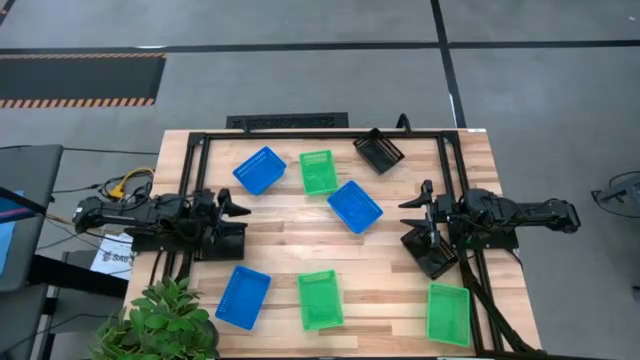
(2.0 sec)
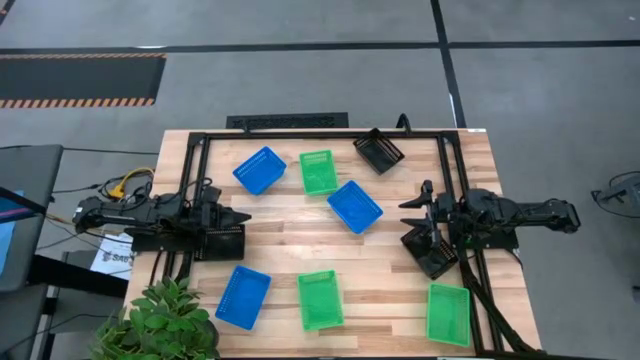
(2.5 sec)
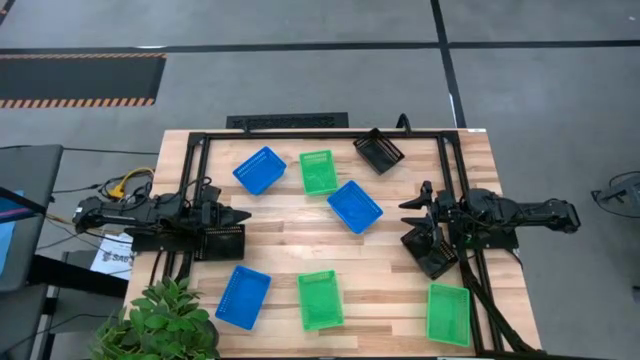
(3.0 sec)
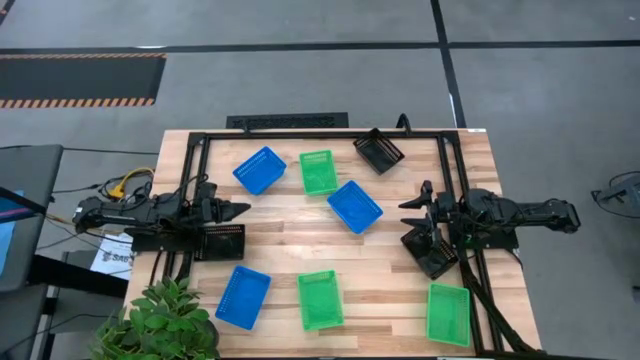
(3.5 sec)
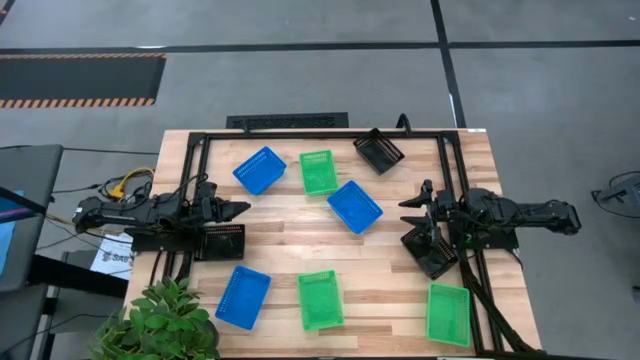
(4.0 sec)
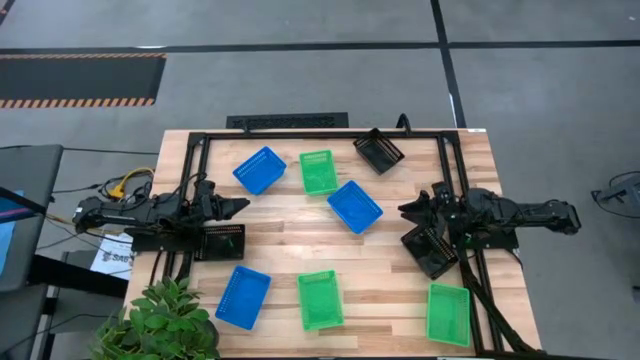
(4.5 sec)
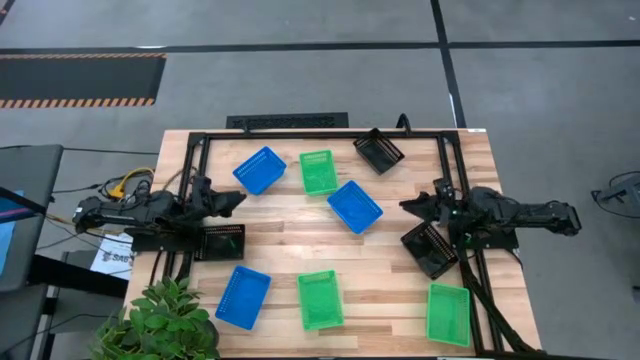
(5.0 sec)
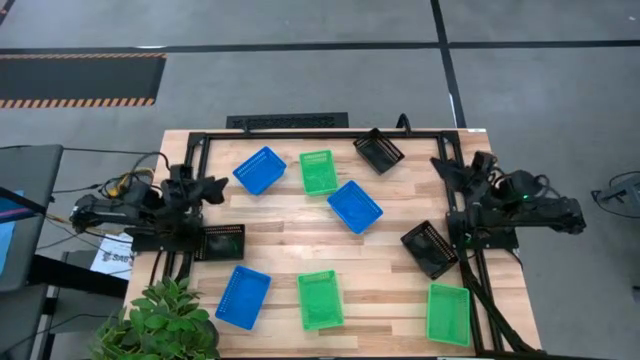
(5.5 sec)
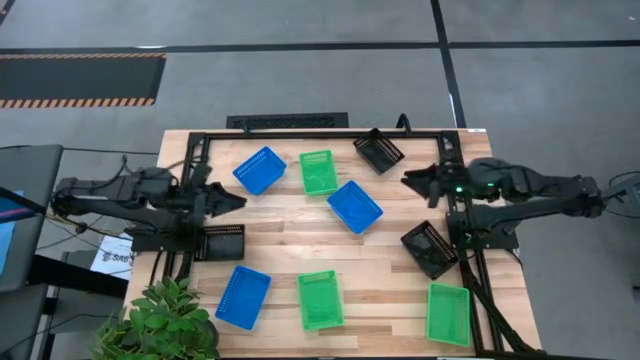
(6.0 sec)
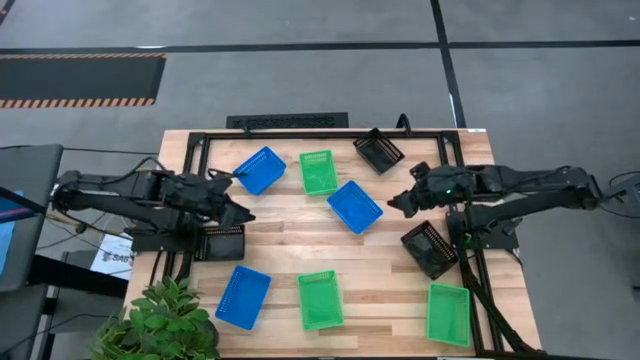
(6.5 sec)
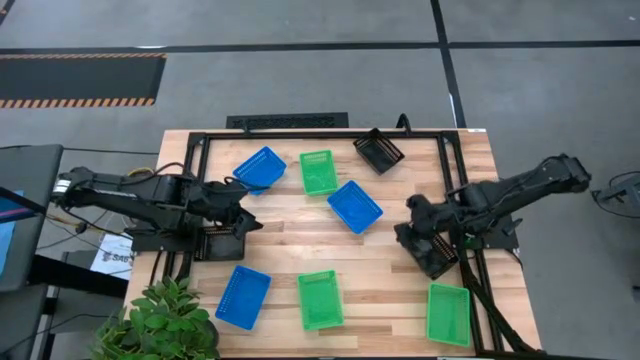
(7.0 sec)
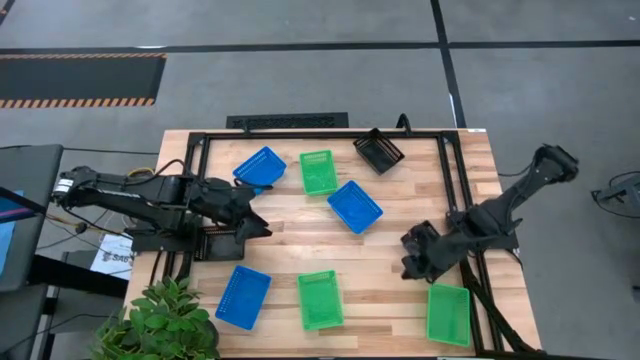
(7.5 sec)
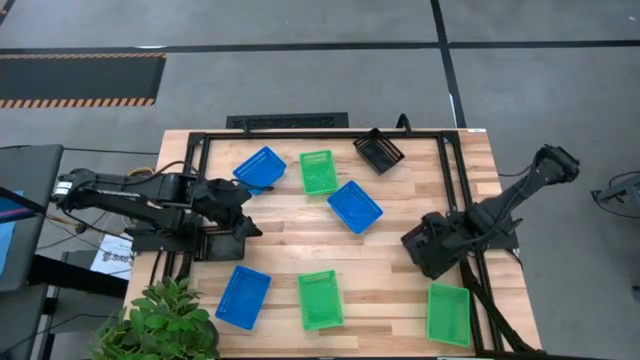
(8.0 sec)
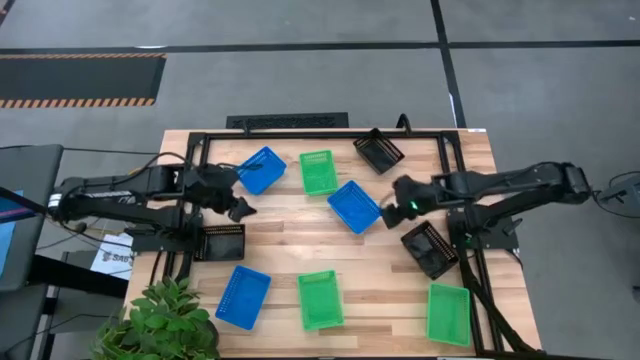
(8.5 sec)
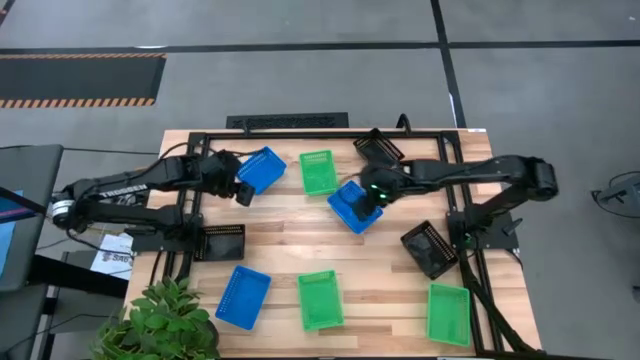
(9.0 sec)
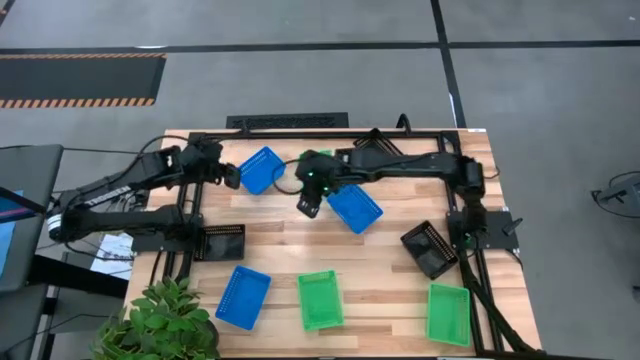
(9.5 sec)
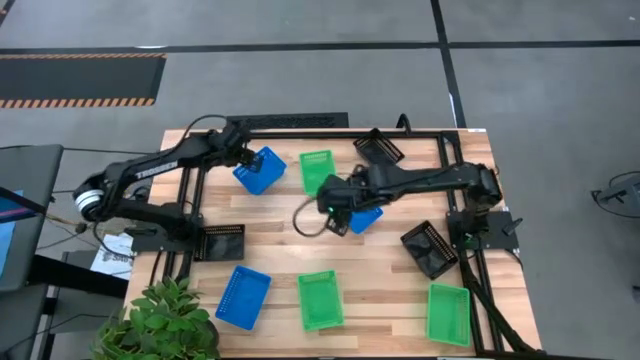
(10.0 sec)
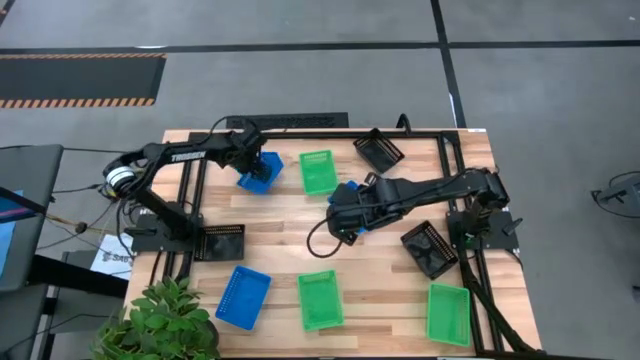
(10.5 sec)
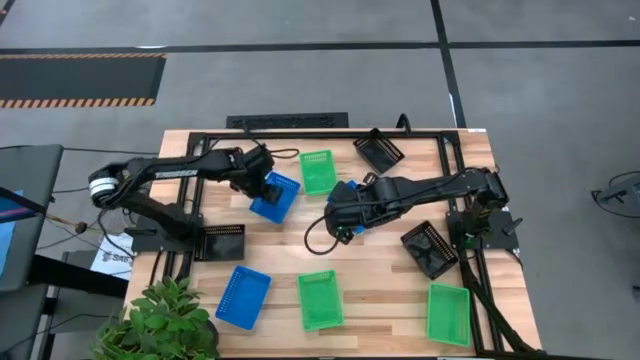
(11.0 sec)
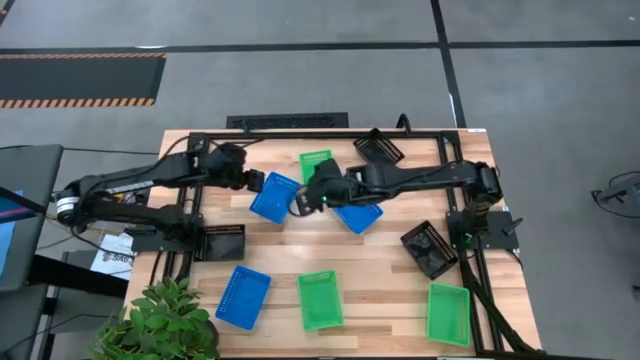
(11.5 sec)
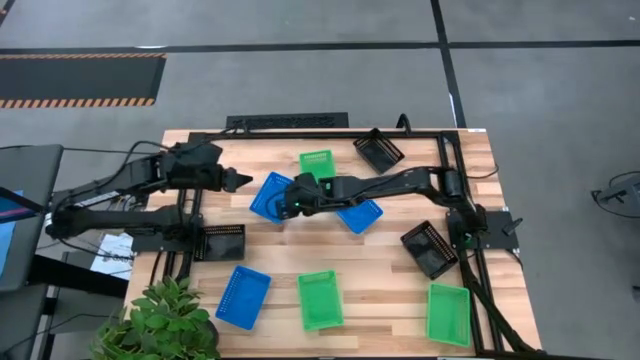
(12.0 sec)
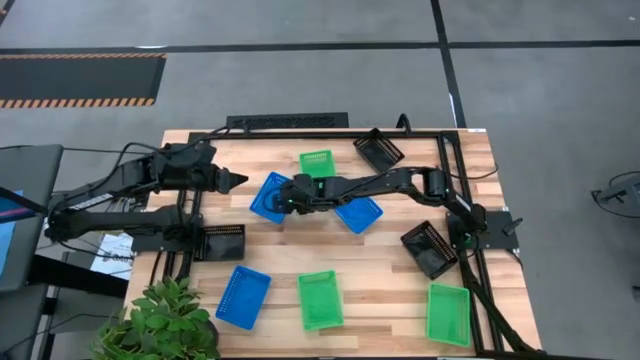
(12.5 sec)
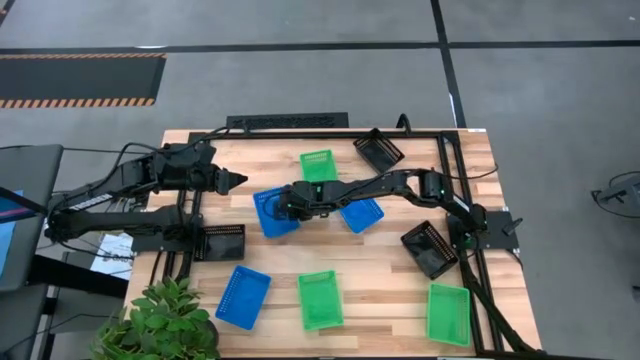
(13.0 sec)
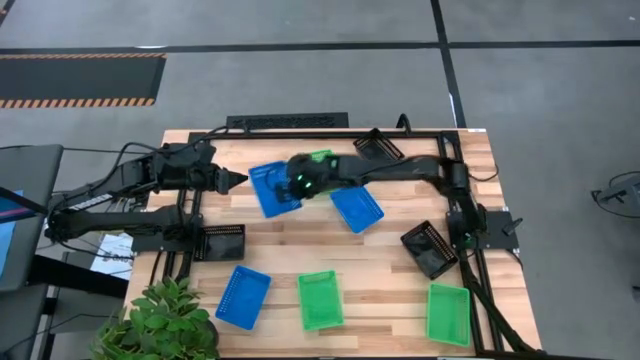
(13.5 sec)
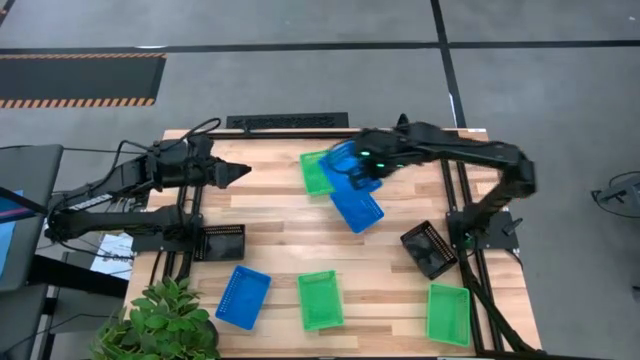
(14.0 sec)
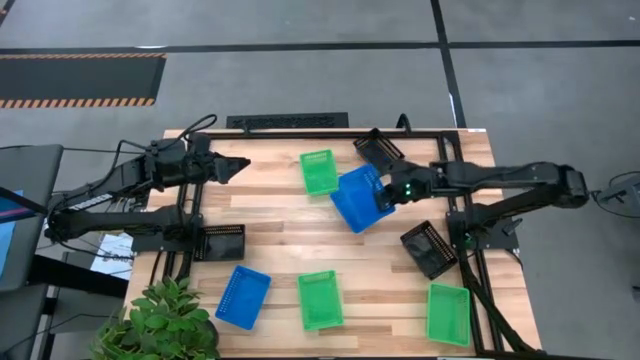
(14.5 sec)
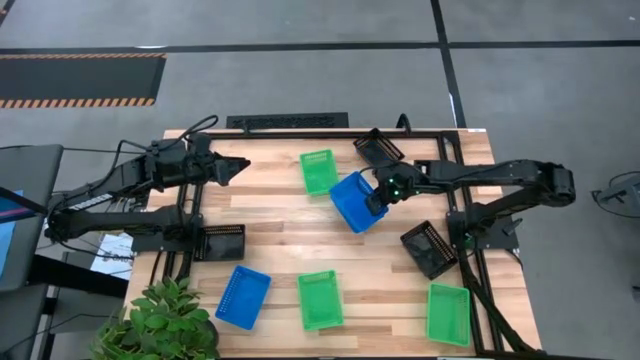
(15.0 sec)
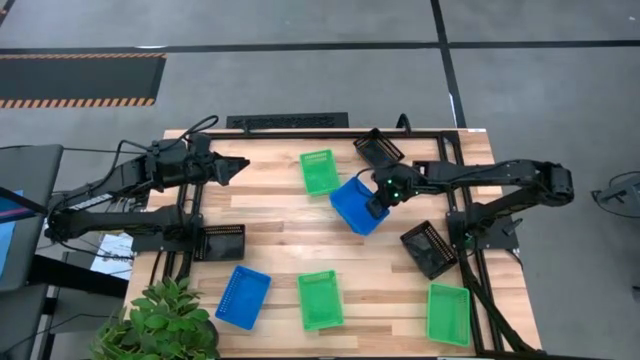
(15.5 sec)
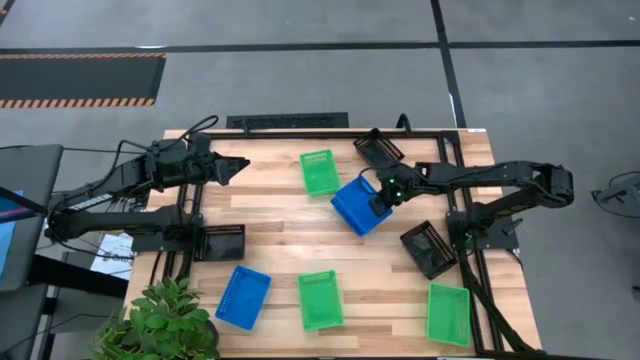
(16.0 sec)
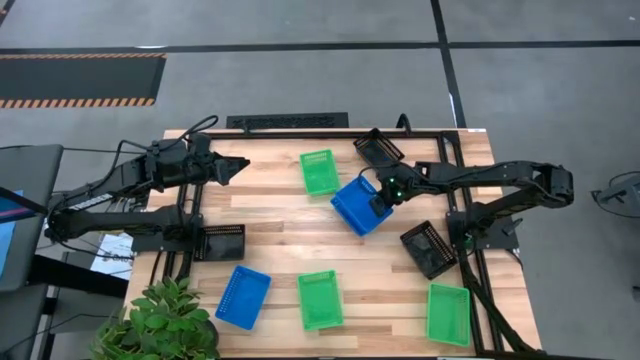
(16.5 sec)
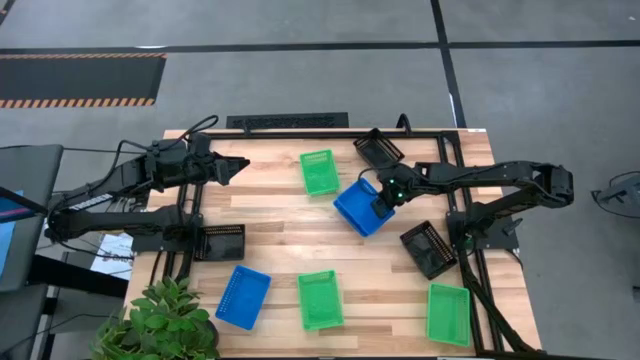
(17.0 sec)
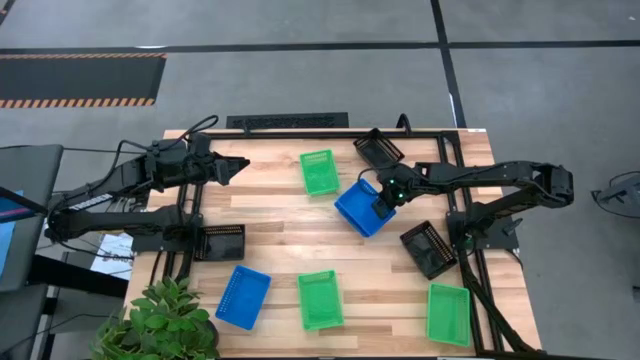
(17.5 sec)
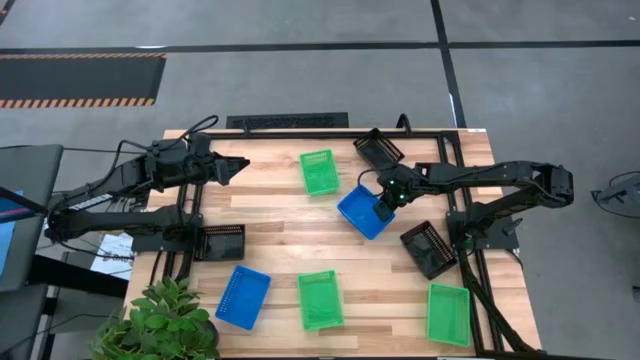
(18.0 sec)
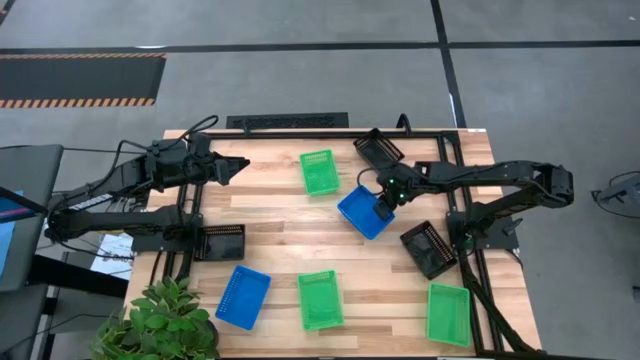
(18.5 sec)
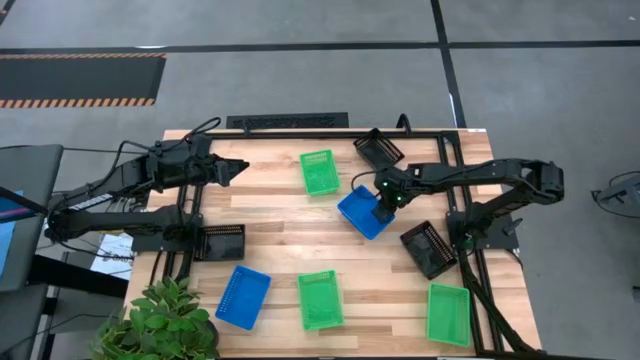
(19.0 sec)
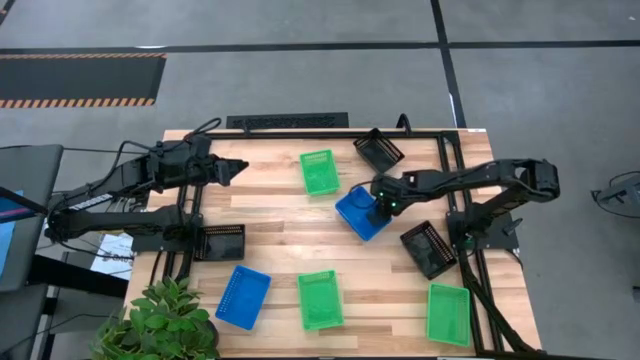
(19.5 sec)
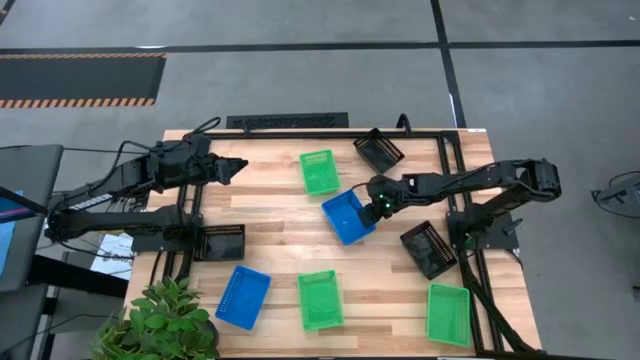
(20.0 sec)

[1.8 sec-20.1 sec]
Stack the top left blue bin on the right blue bin
